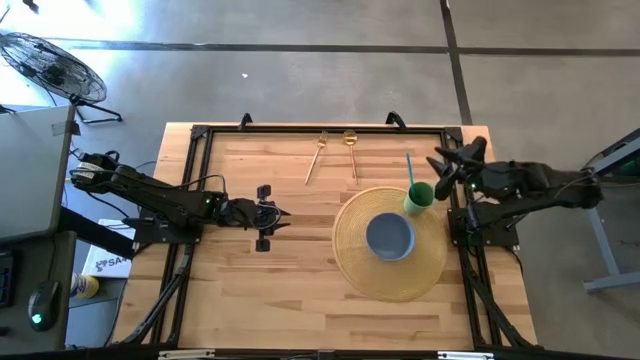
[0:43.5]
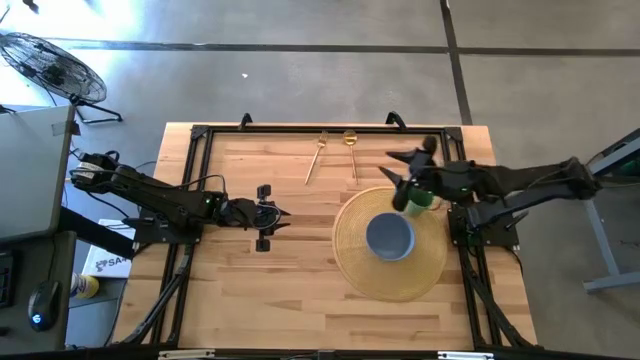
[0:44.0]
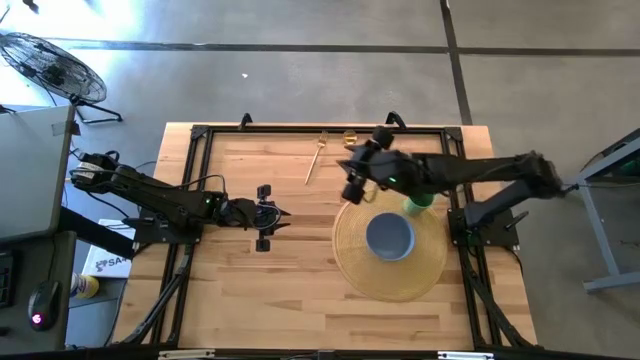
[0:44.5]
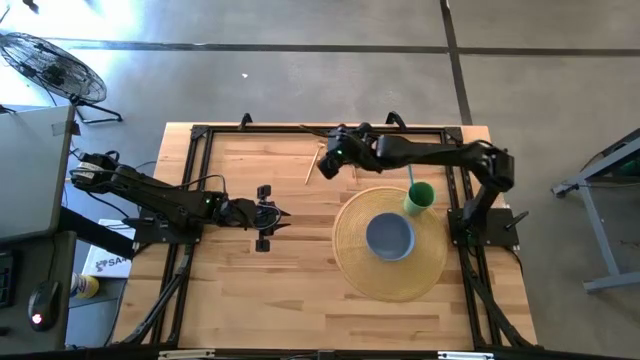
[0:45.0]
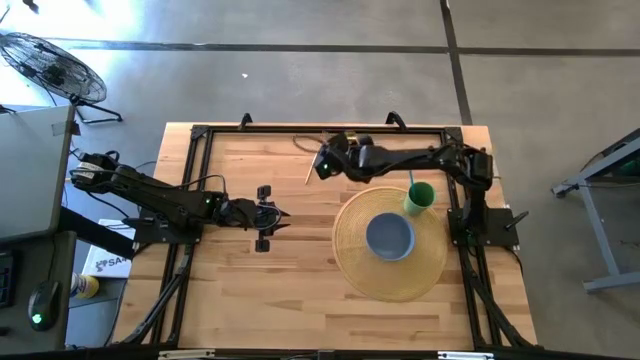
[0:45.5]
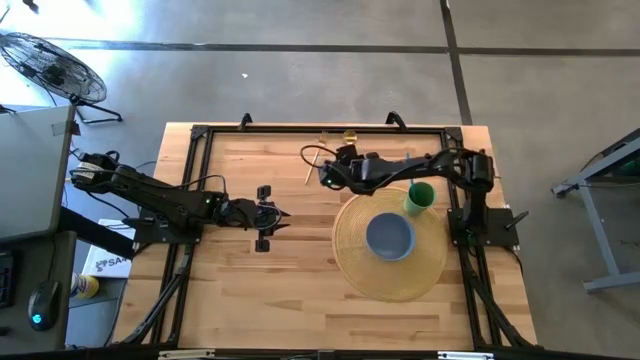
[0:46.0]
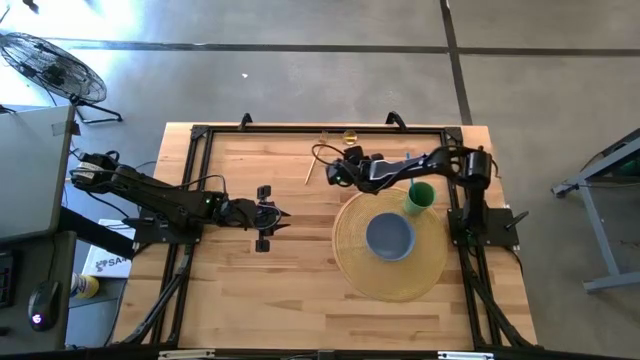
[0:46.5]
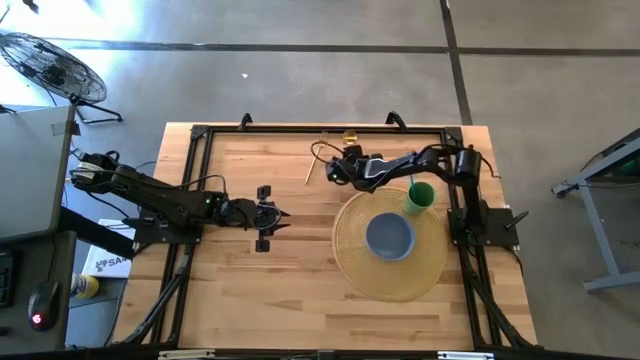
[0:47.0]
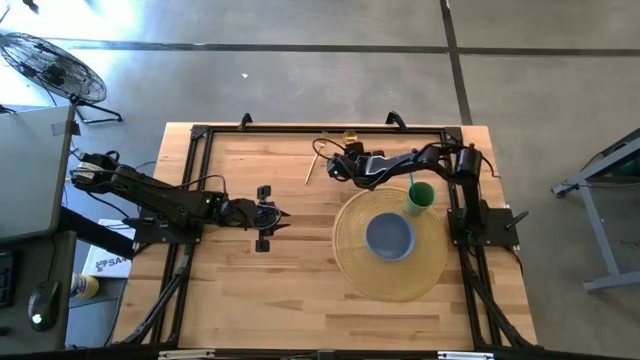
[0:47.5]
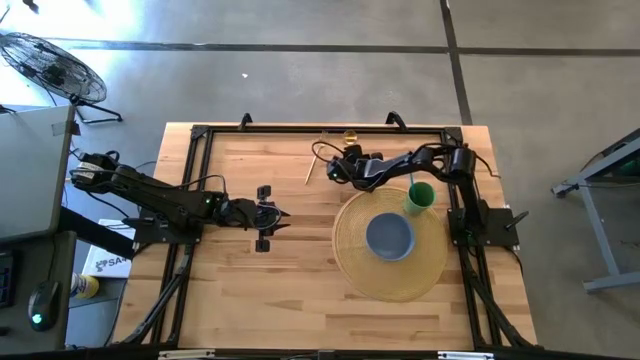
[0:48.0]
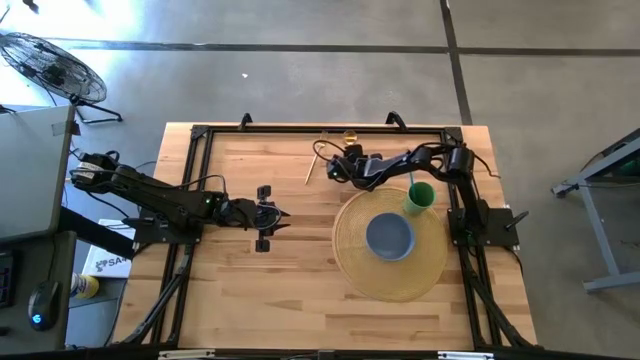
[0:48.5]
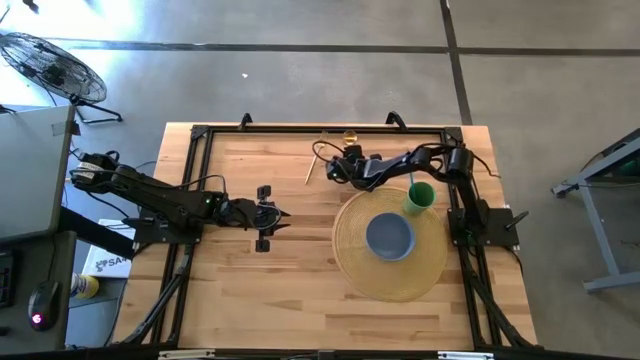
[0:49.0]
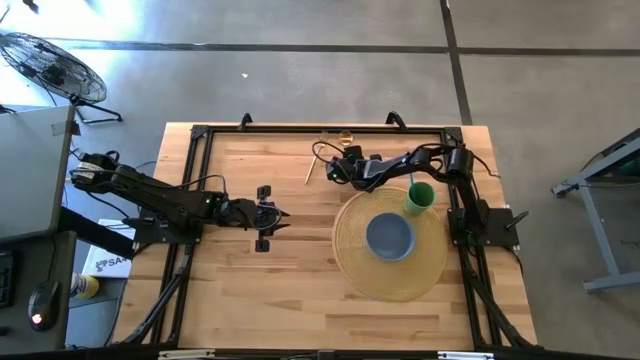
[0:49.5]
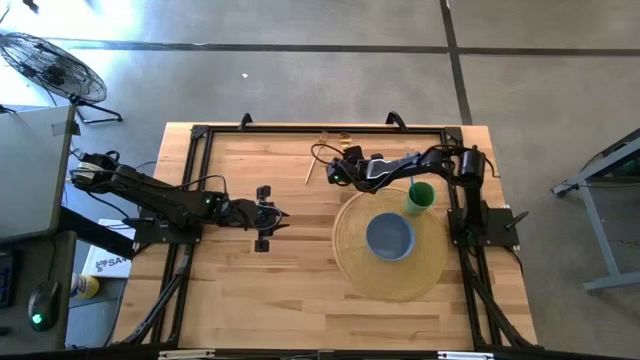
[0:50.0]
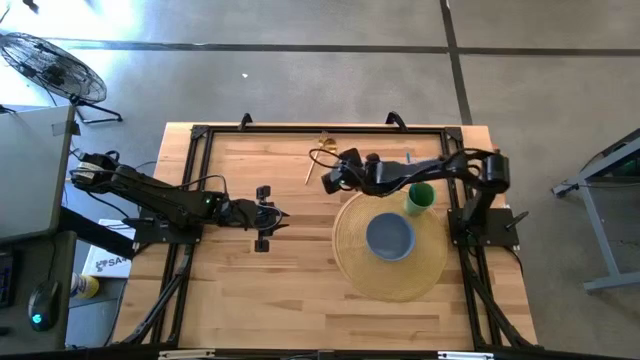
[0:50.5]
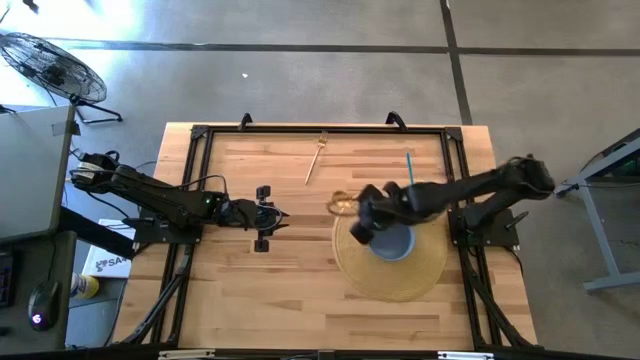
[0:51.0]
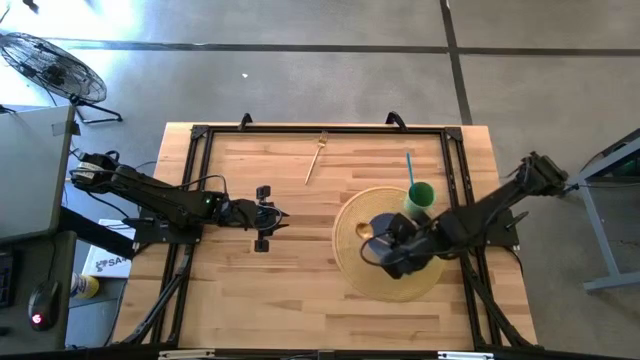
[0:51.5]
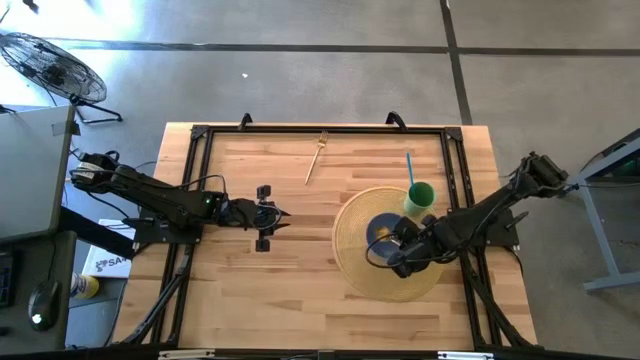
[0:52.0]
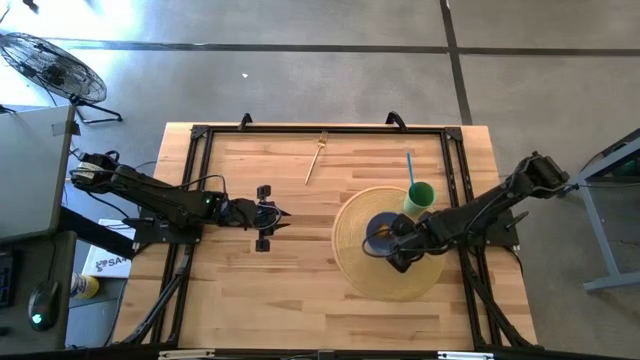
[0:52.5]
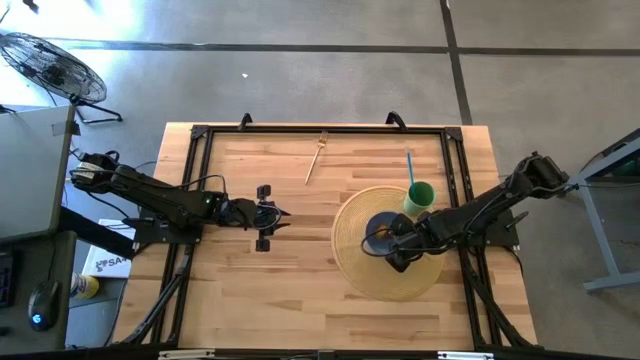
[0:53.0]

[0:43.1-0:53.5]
Task: Pick & Place Utensil
Put the gold spoon into the blue bowl

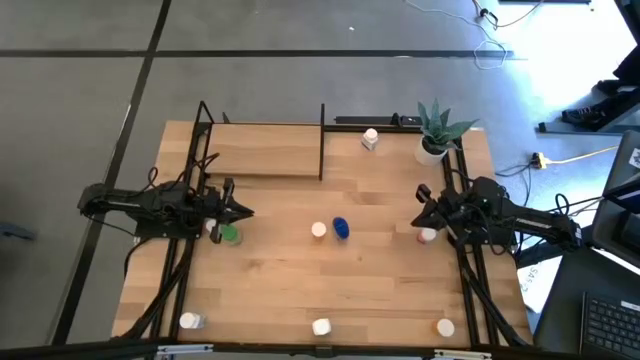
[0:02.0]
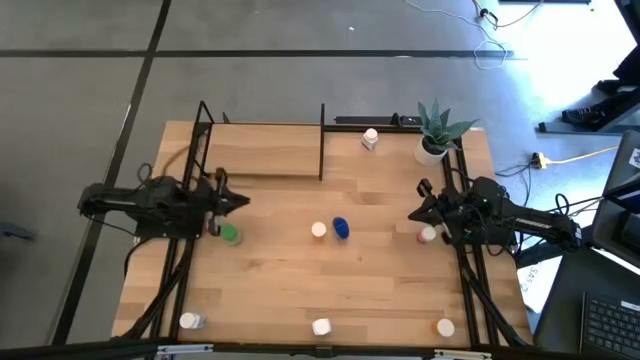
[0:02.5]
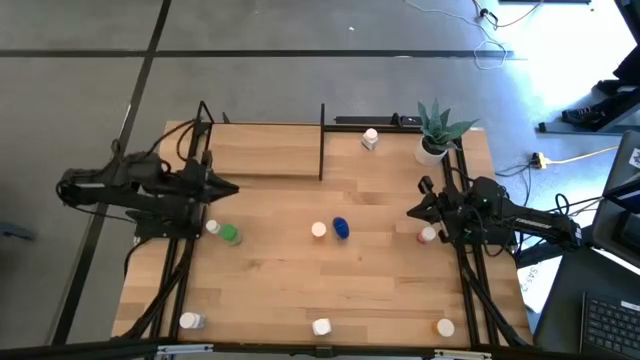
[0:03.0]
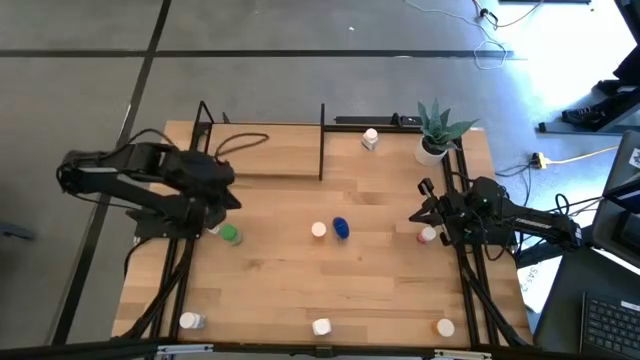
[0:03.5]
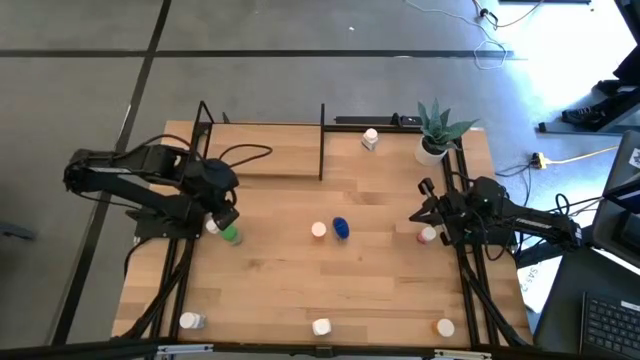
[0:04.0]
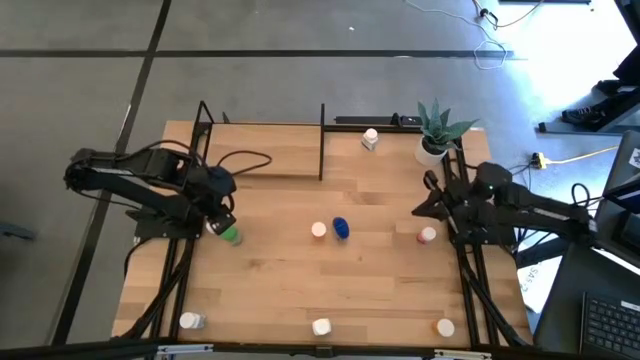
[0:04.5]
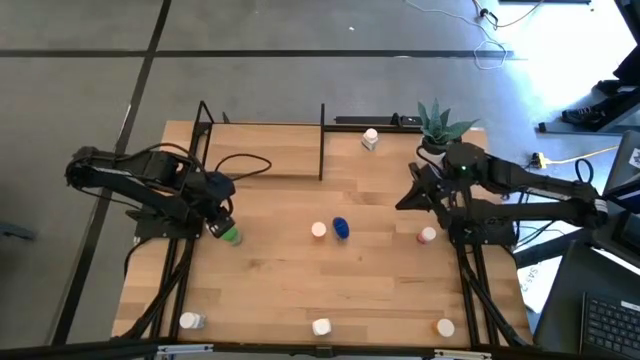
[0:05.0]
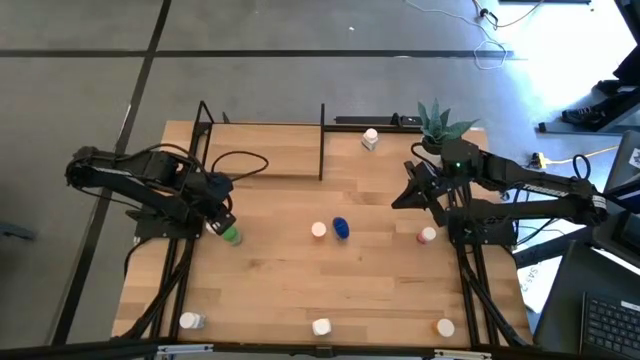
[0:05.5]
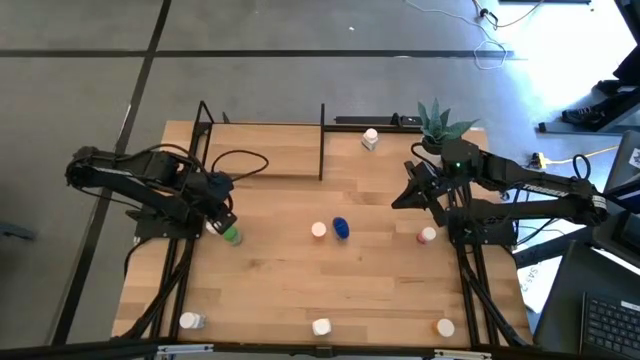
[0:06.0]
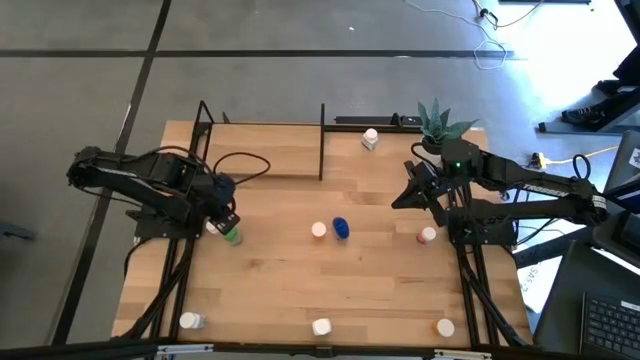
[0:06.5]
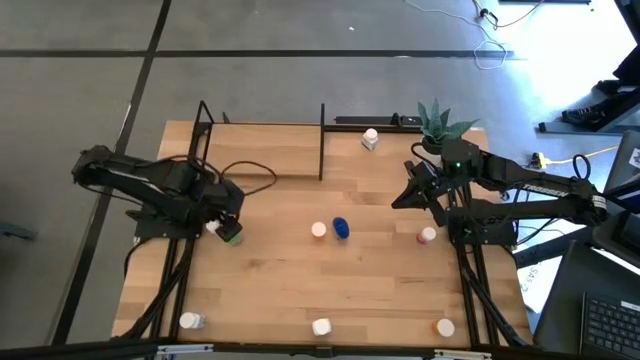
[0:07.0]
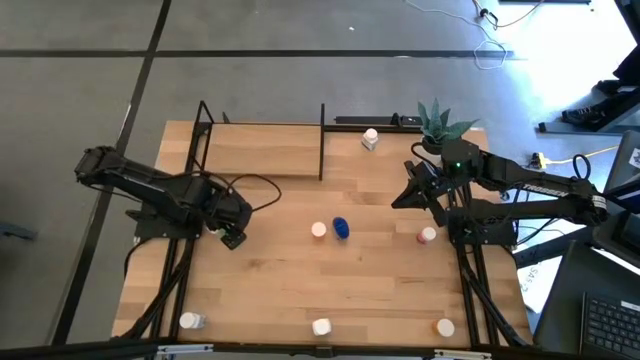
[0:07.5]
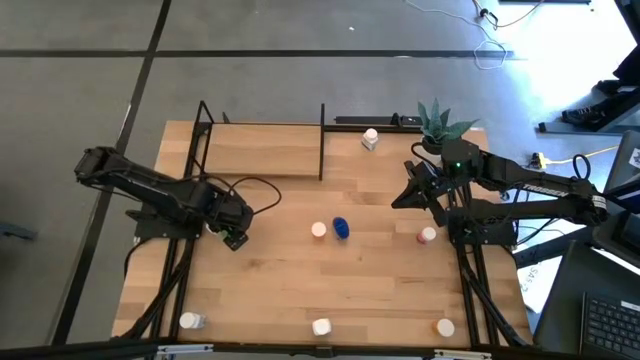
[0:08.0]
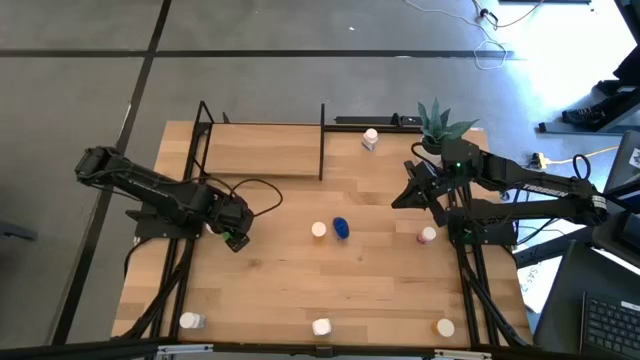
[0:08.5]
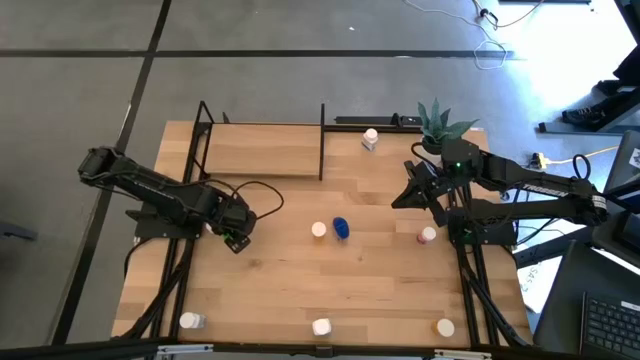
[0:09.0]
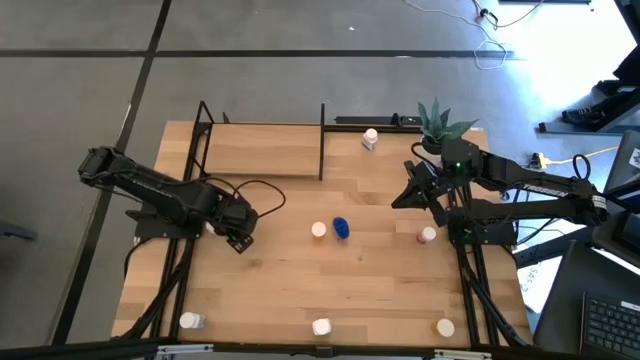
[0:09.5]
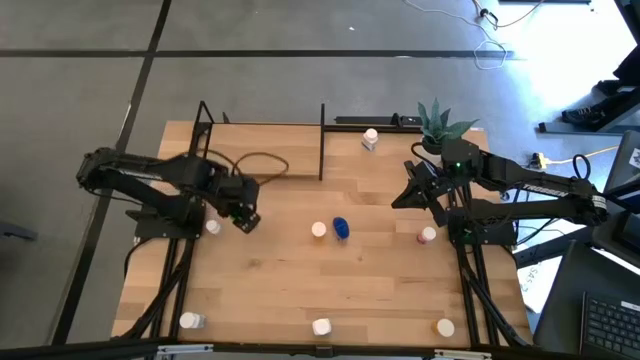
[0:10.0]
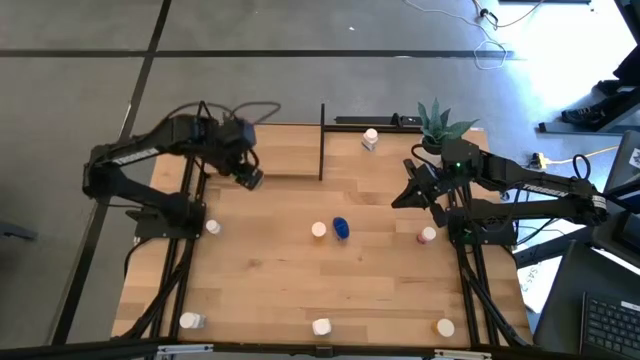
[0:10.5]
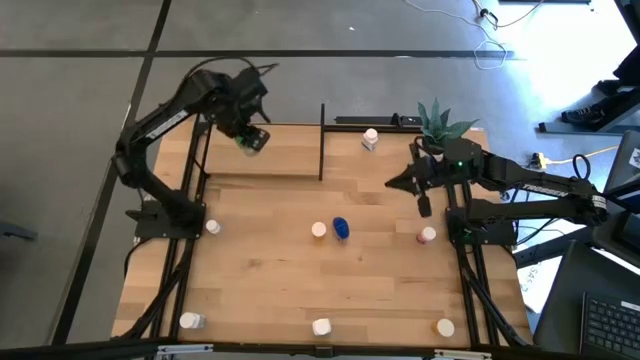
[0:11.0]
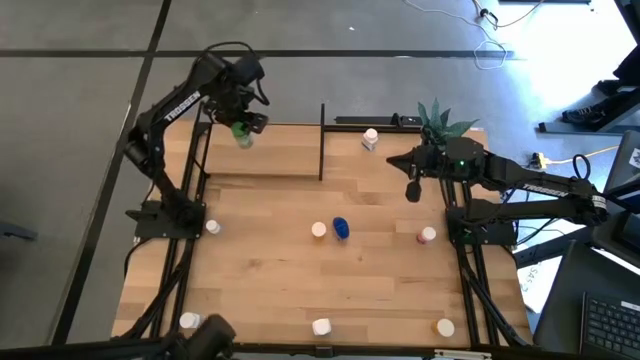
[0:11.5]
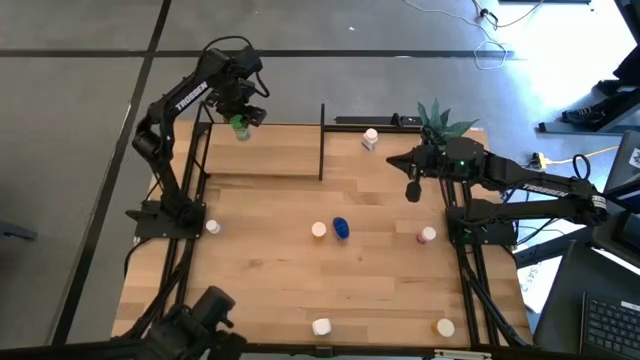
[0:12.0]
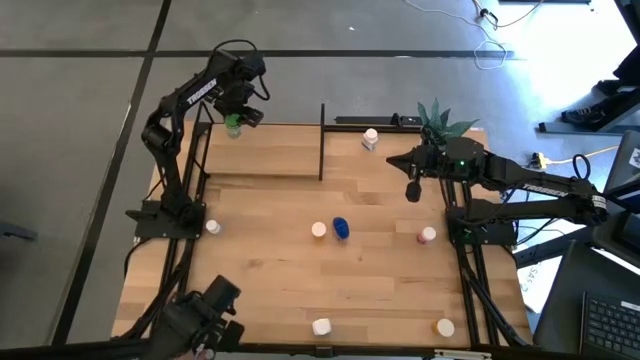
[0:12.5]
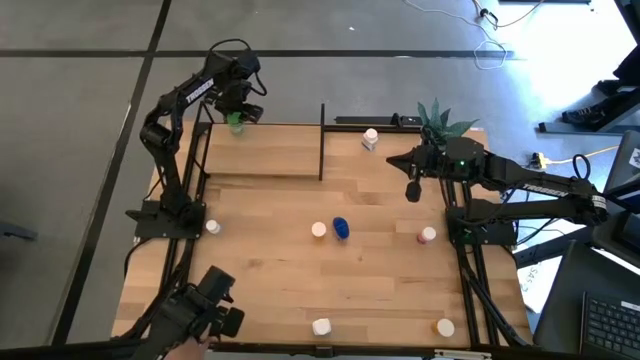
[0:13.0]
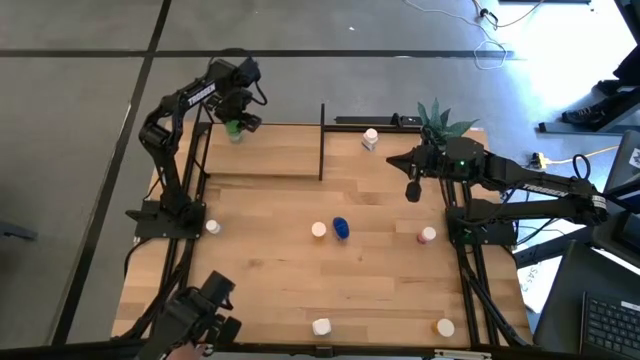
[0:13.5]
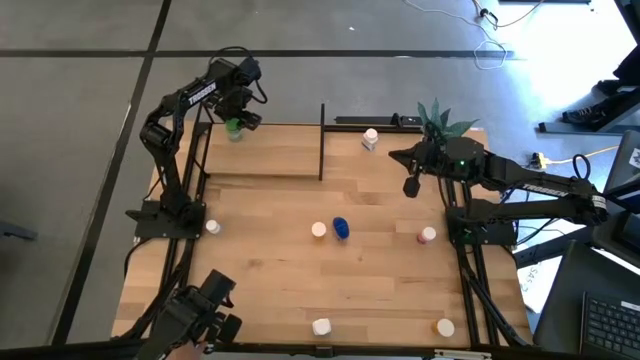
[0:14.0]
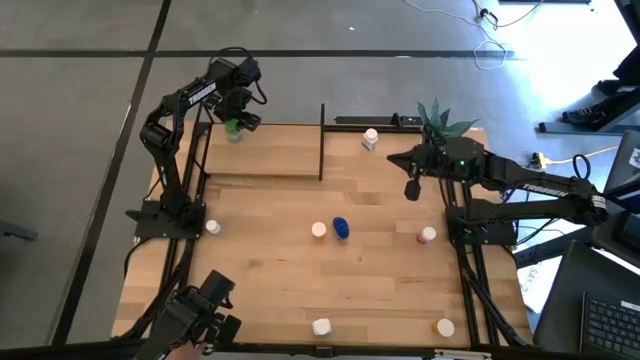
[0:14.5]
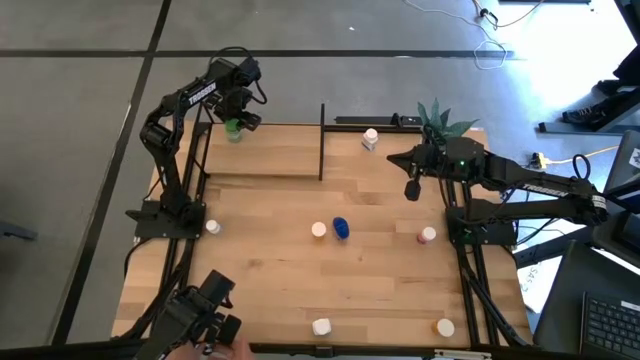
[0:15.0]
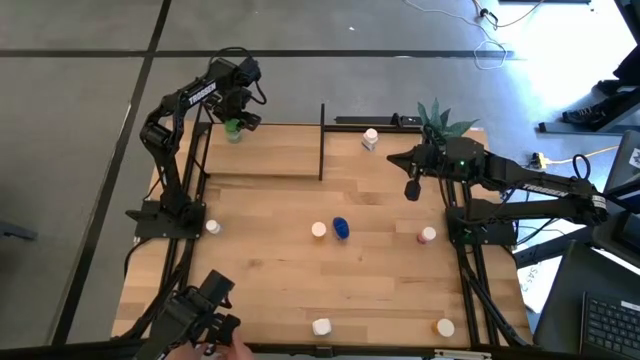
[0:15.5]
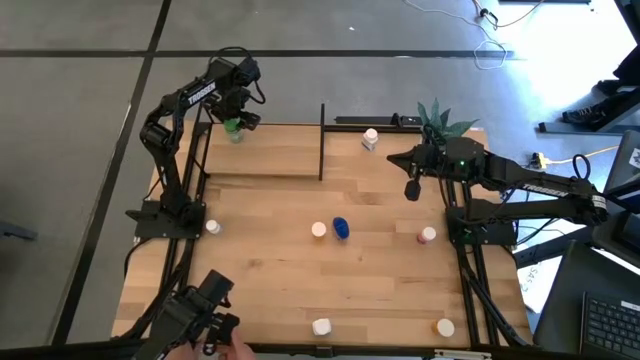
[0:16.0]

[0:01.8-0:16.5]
Task: Pick and place medicine bottles onto shelf by color
Put the green pill bottle on the shelf
